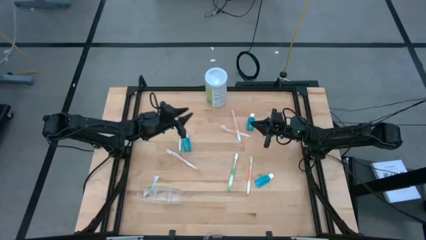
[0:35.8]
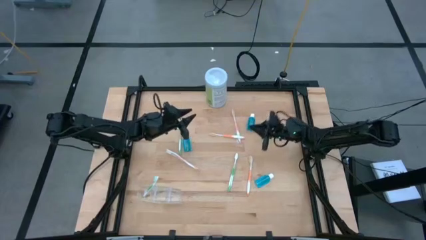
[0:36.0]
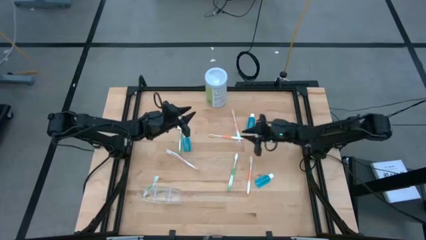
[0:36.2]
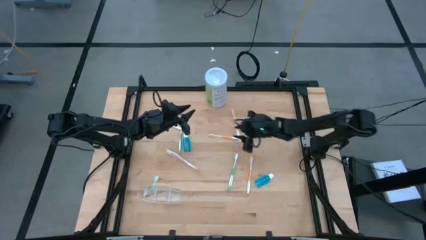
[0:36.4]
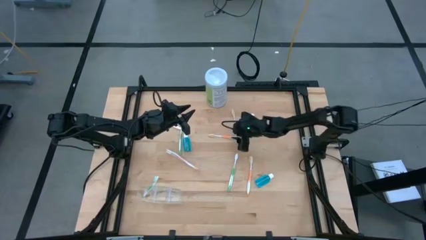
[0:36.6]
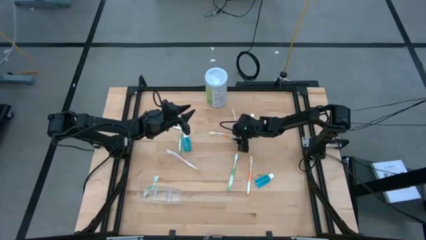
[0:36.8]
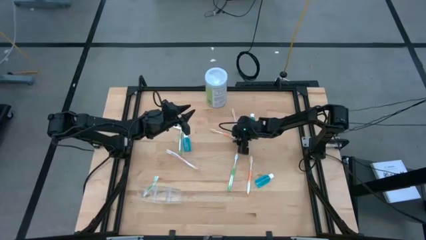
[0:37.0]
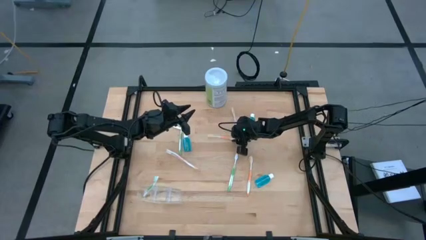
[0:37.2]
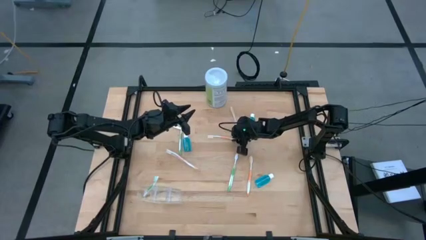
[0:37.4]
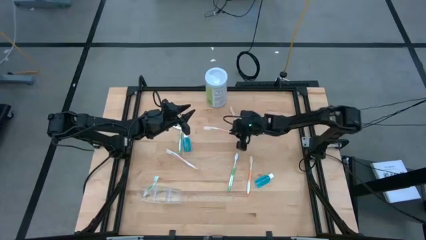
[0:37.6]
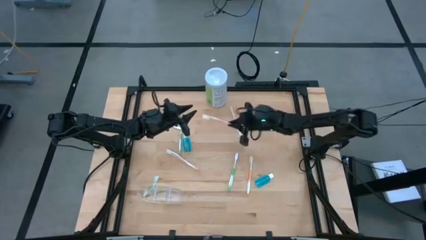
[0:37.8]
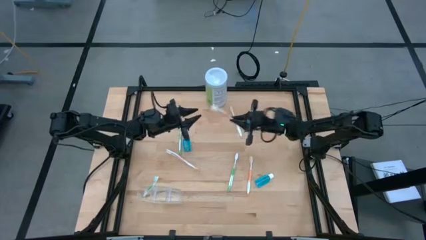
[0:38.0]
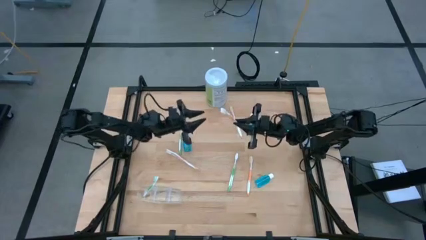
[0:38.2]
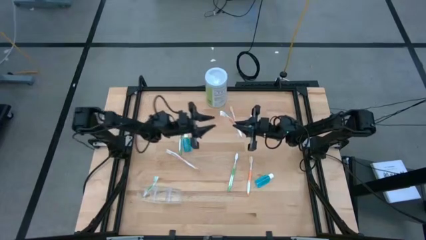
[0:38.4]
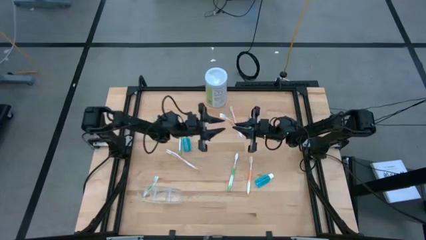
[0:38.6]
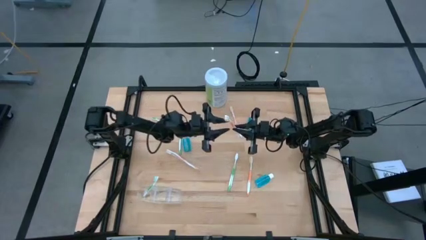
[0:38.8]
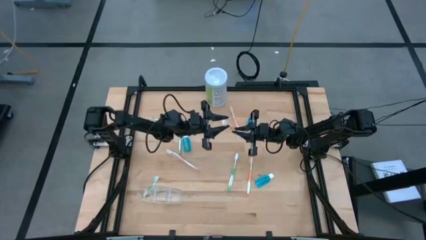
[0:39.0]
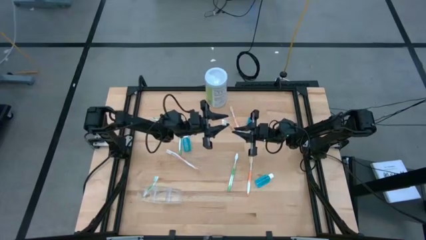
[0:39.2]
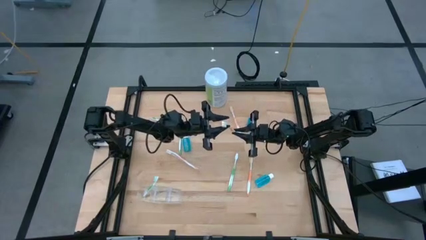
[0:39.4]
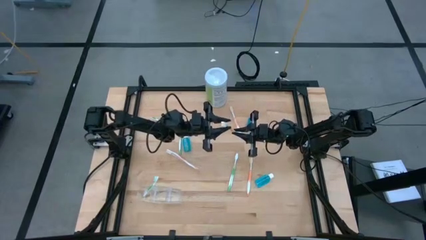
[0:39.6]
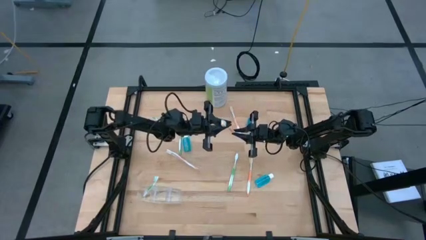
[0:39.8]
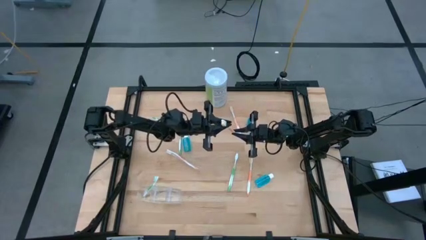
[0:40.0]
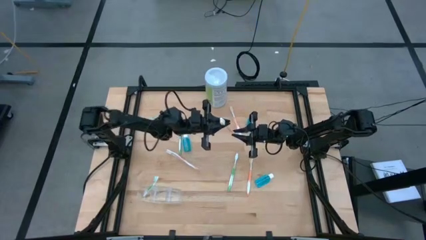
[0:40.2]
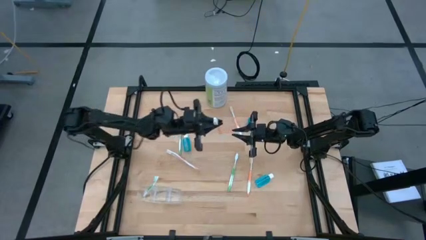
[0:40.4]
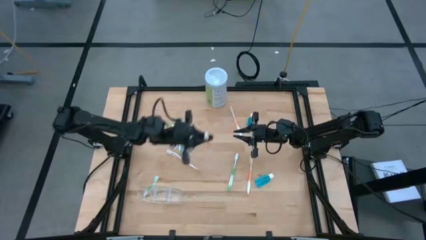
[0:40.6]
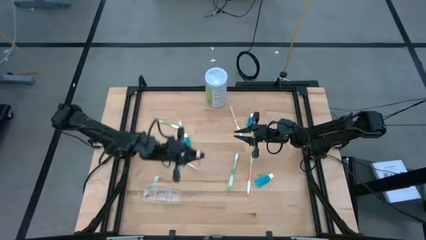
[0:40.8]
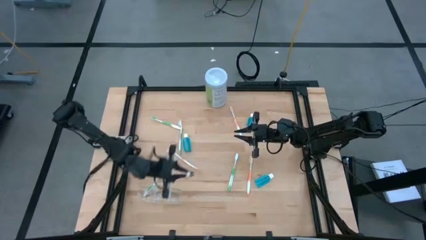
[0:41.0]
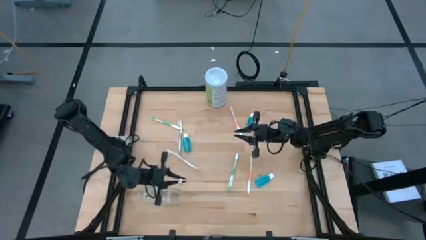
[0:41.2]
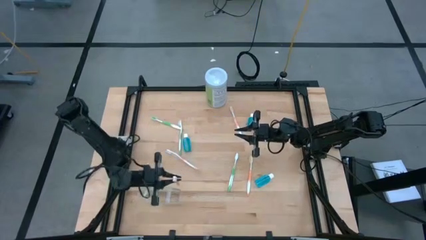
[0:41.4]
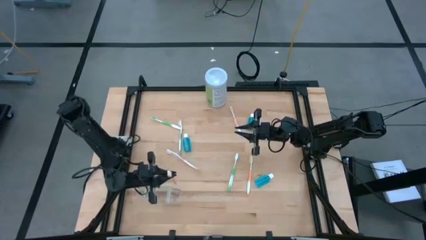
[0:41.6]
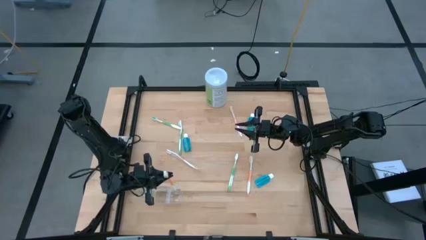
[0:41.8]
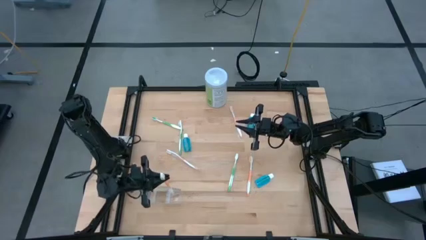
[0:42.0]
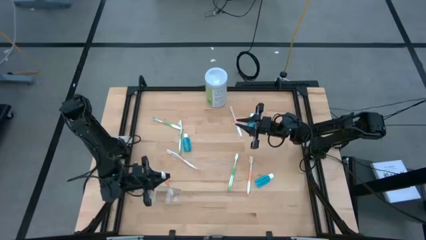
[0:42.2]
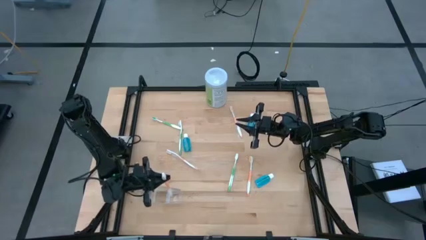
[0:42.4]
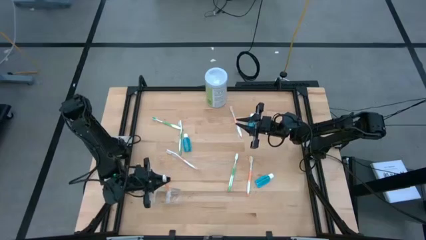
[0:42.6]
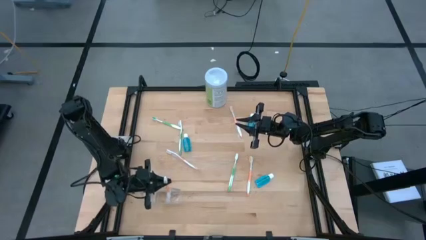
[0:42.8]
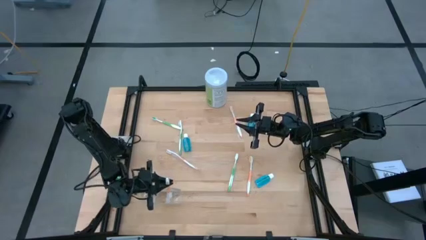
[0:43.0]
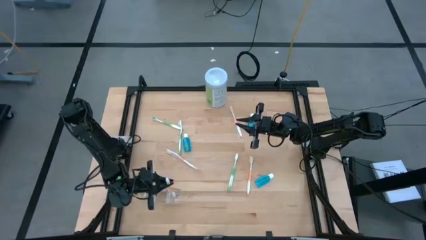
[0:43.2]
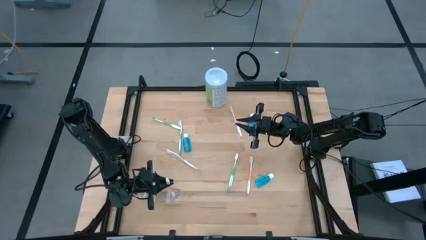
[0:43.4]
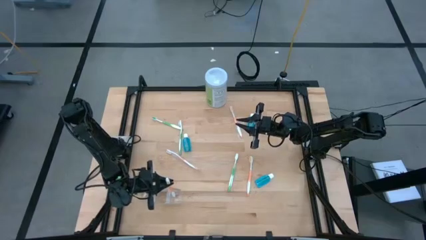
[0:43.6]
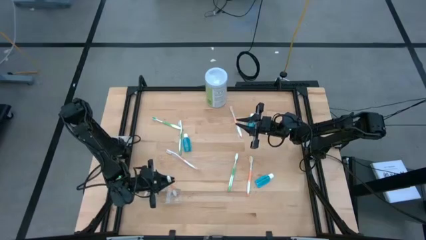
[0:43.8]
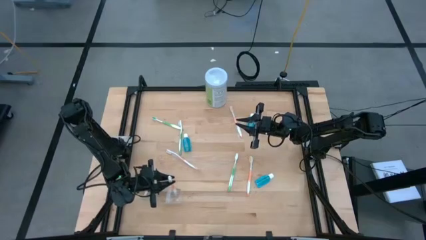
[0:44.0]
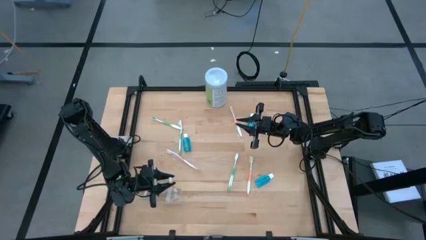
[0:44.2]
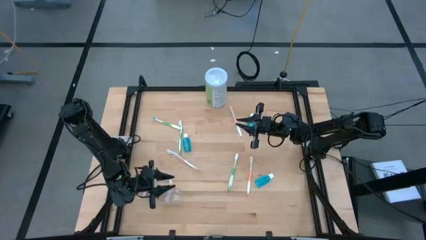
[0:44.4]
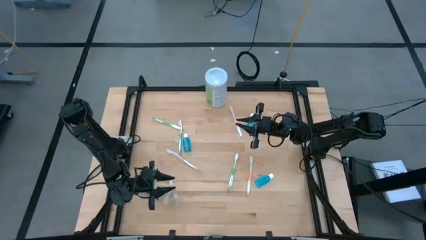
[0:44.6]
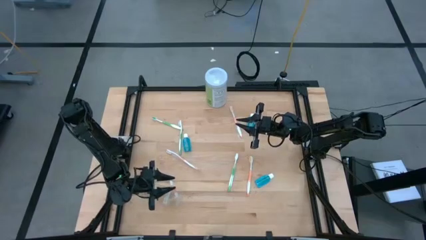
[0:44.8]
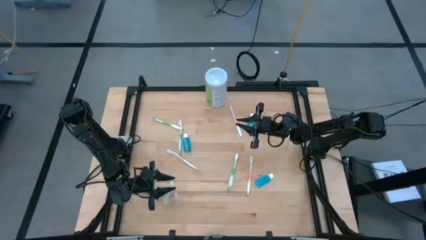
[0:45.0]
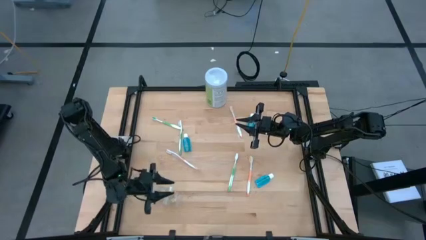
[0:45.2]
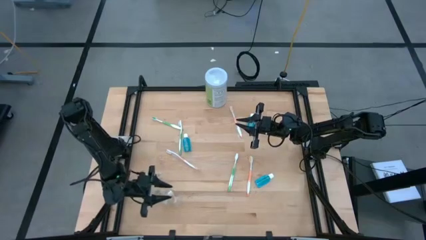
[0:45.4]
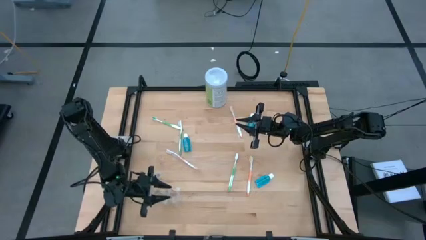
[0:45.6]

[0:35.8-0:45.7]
Task: Pick & Place toothbrushing station
Put the orange toothbrush into the transparent organizer
